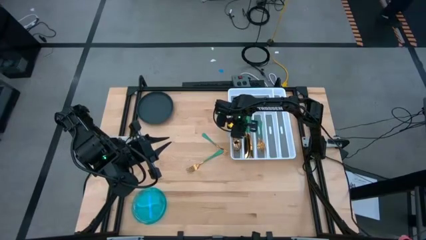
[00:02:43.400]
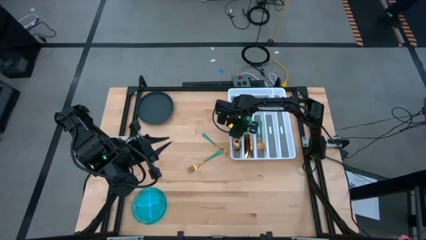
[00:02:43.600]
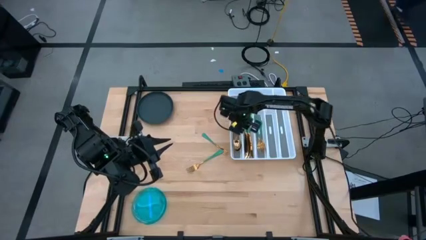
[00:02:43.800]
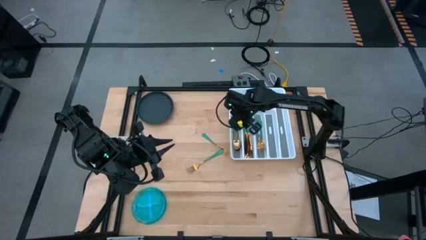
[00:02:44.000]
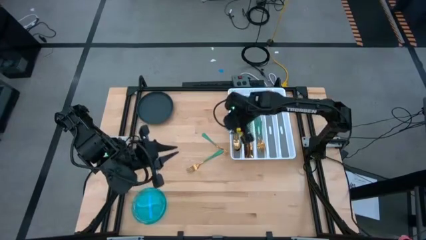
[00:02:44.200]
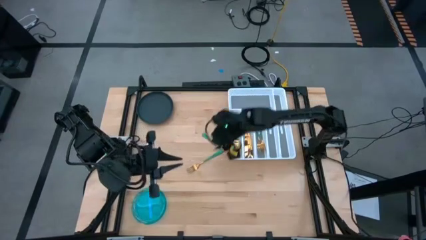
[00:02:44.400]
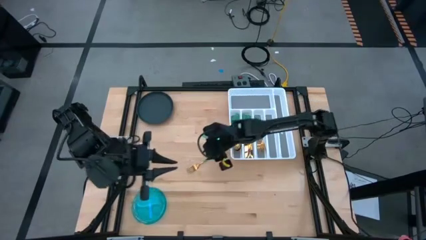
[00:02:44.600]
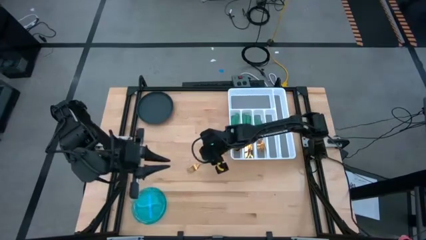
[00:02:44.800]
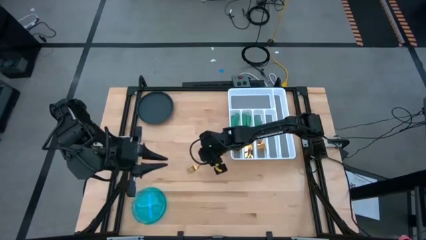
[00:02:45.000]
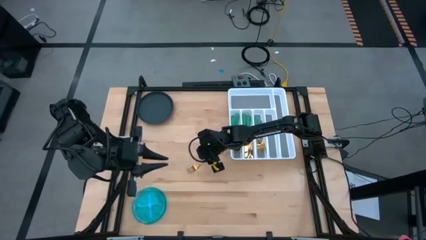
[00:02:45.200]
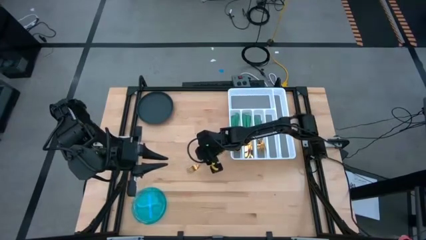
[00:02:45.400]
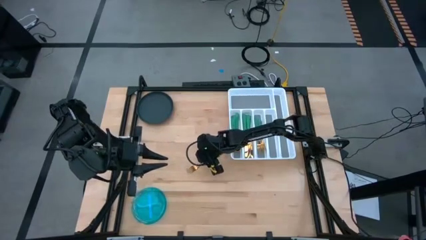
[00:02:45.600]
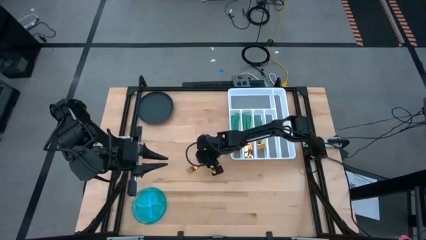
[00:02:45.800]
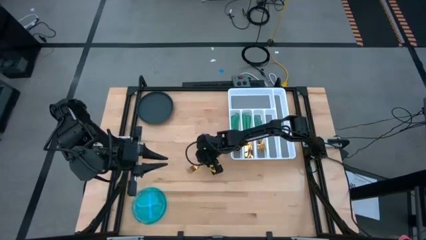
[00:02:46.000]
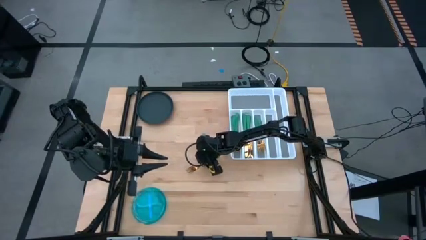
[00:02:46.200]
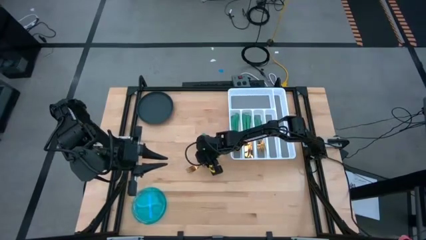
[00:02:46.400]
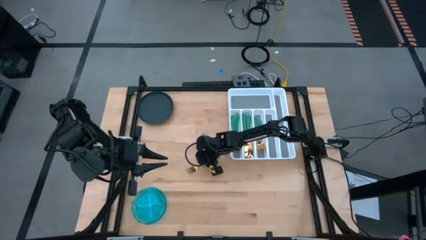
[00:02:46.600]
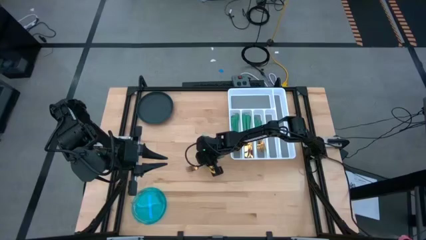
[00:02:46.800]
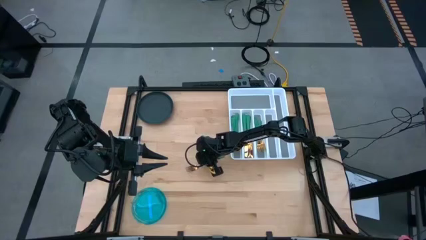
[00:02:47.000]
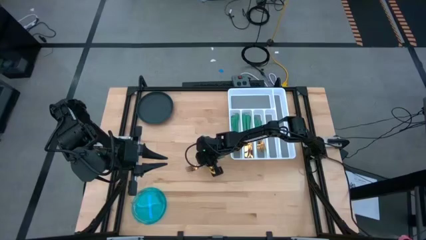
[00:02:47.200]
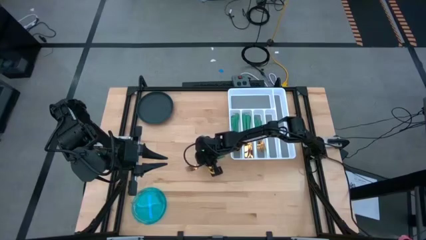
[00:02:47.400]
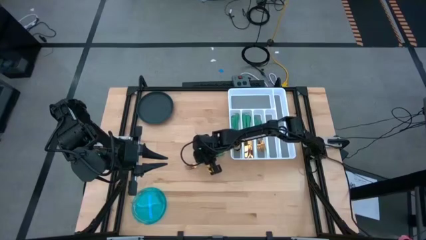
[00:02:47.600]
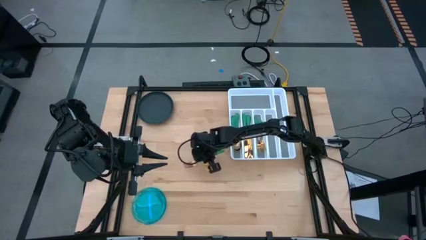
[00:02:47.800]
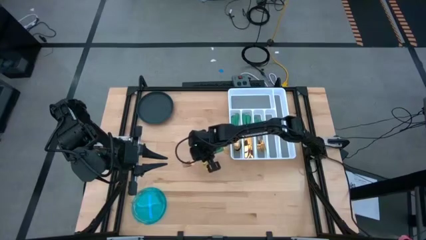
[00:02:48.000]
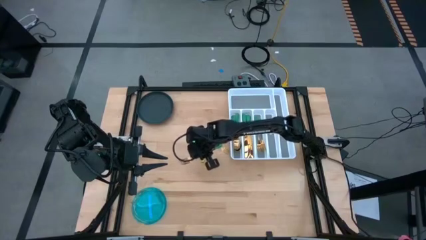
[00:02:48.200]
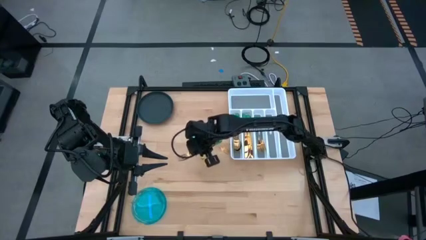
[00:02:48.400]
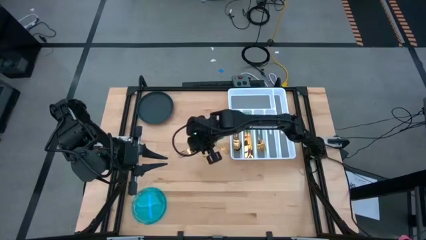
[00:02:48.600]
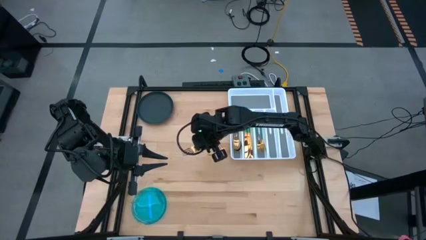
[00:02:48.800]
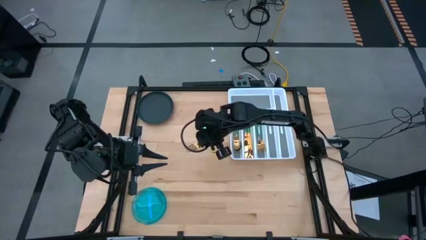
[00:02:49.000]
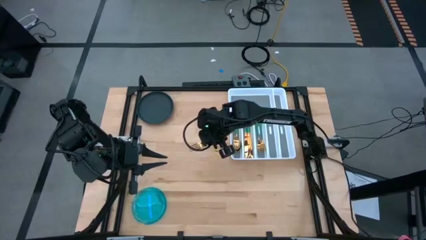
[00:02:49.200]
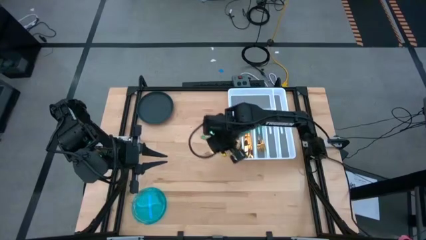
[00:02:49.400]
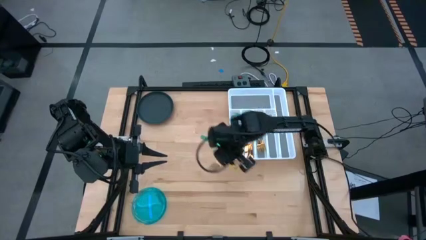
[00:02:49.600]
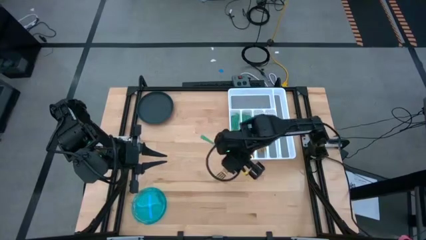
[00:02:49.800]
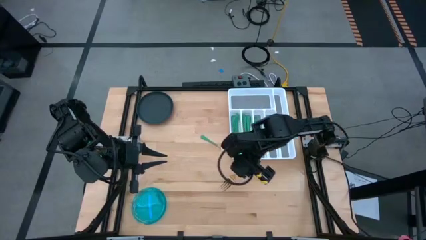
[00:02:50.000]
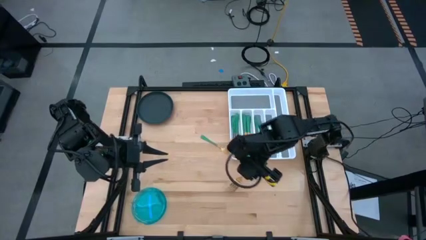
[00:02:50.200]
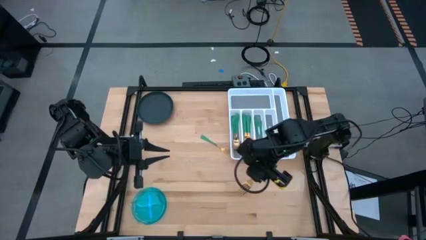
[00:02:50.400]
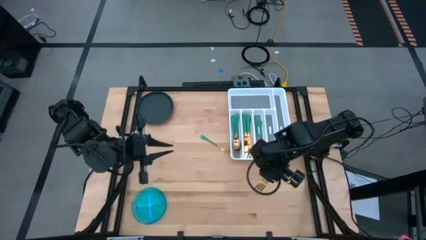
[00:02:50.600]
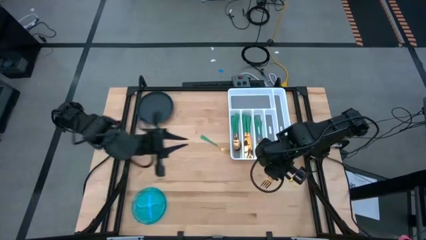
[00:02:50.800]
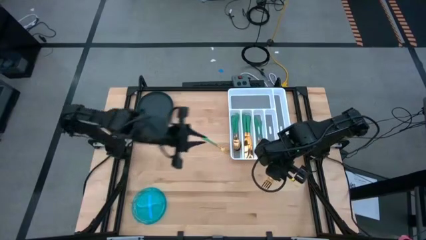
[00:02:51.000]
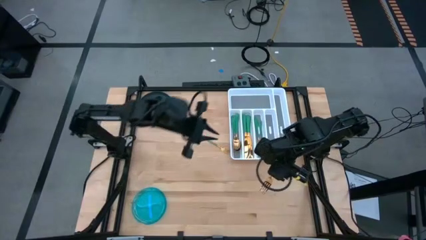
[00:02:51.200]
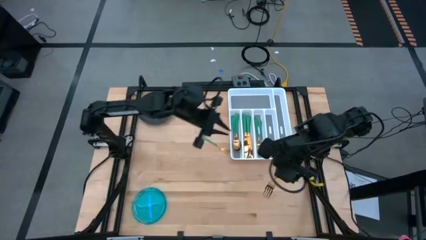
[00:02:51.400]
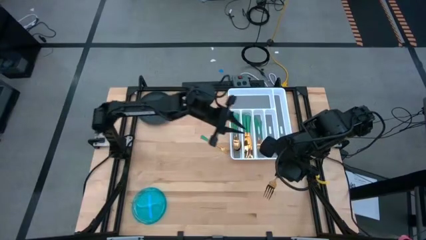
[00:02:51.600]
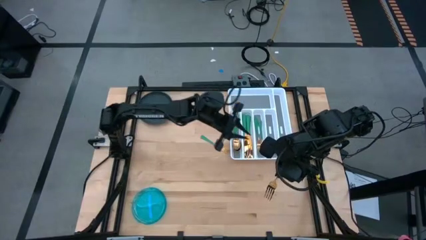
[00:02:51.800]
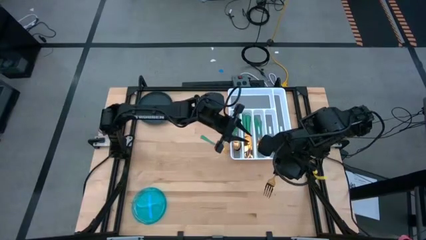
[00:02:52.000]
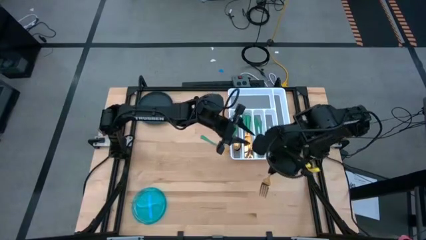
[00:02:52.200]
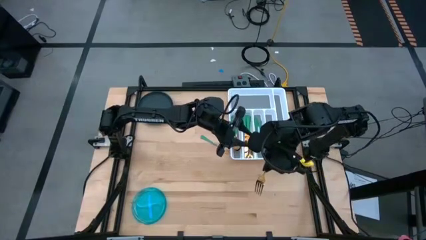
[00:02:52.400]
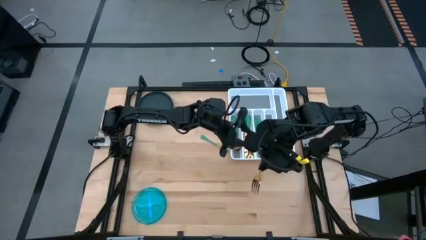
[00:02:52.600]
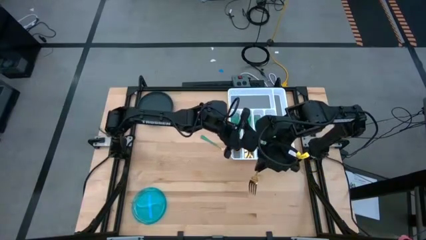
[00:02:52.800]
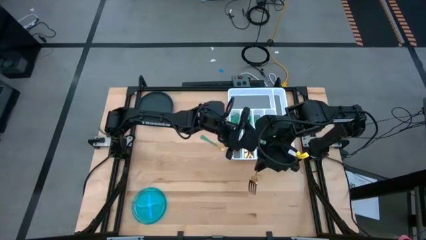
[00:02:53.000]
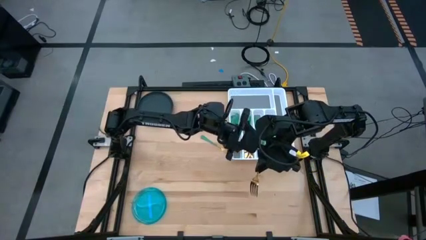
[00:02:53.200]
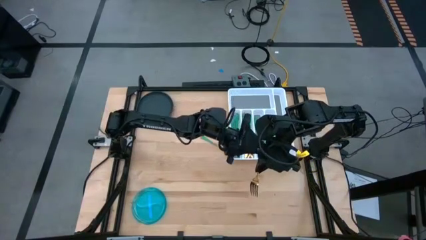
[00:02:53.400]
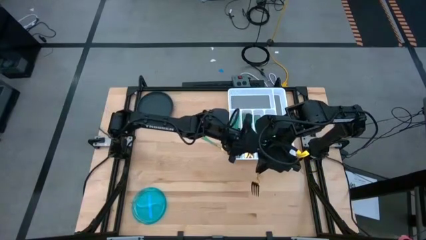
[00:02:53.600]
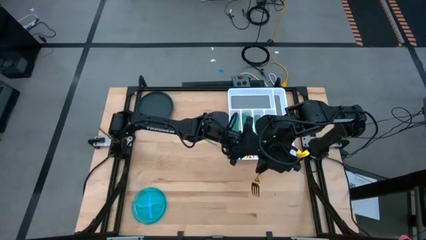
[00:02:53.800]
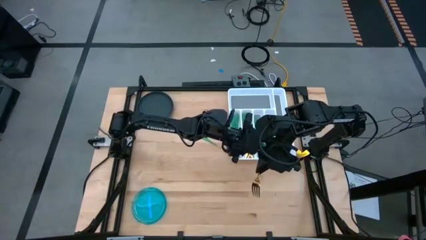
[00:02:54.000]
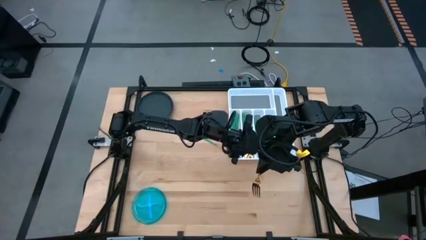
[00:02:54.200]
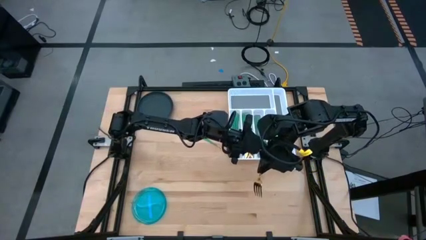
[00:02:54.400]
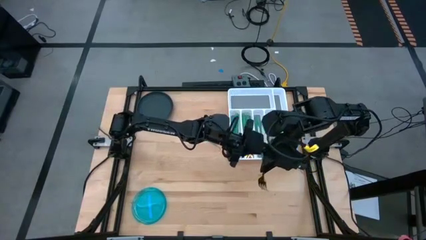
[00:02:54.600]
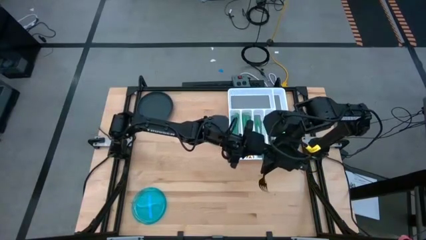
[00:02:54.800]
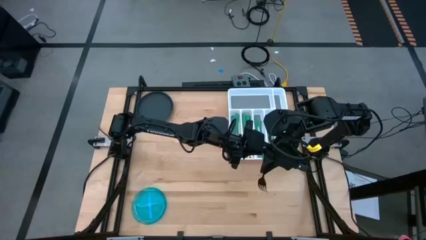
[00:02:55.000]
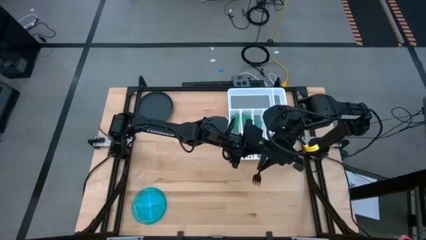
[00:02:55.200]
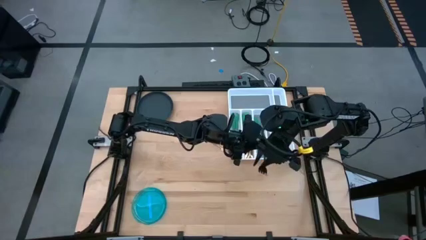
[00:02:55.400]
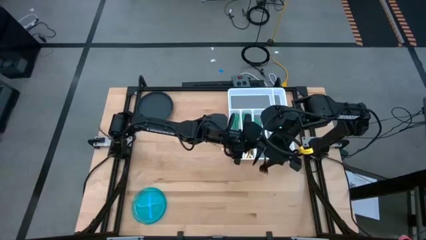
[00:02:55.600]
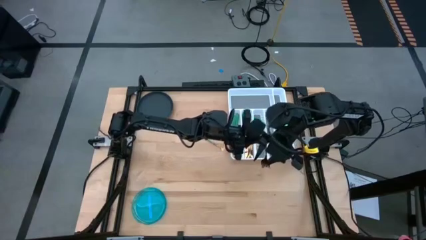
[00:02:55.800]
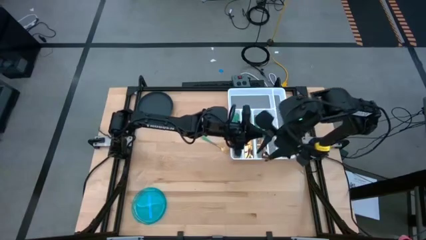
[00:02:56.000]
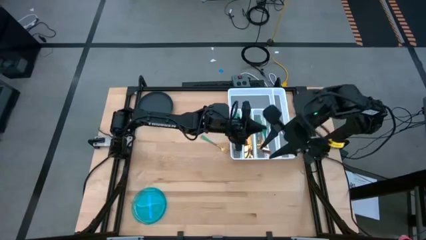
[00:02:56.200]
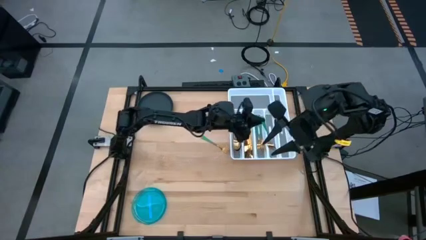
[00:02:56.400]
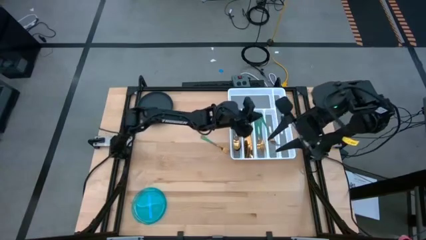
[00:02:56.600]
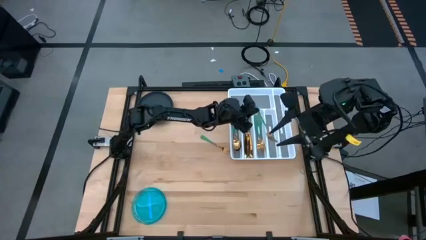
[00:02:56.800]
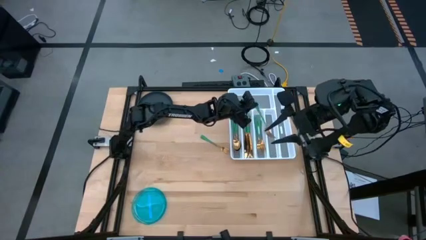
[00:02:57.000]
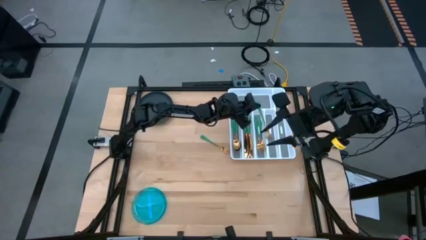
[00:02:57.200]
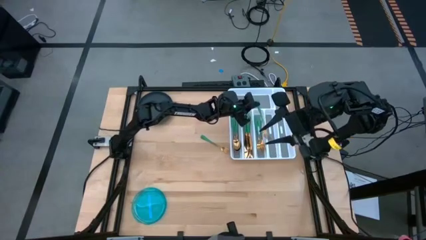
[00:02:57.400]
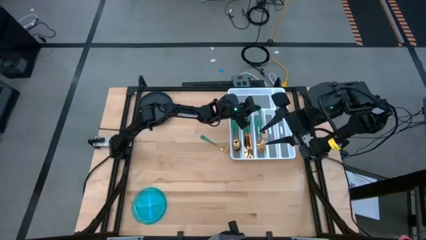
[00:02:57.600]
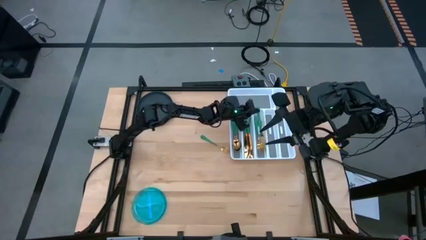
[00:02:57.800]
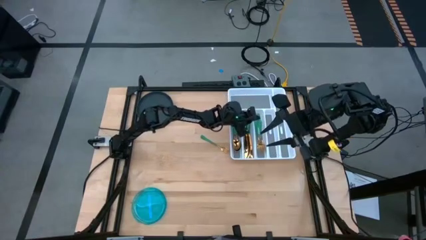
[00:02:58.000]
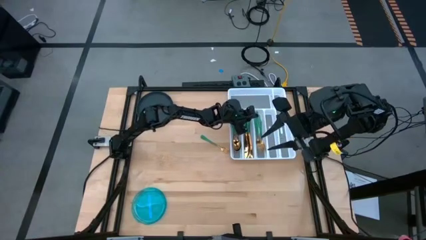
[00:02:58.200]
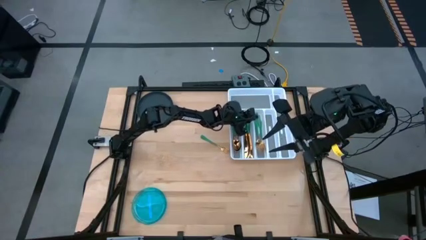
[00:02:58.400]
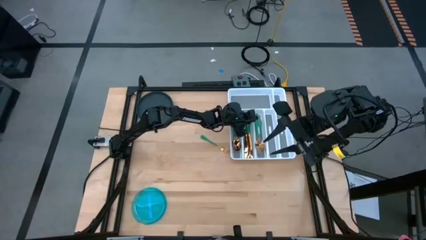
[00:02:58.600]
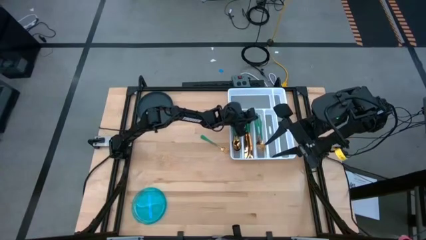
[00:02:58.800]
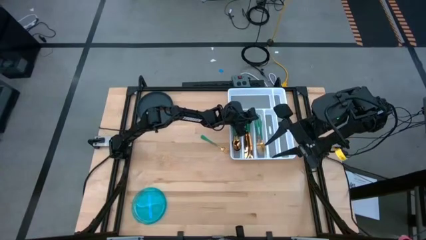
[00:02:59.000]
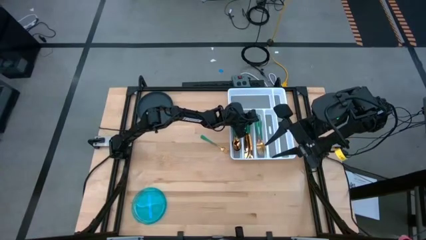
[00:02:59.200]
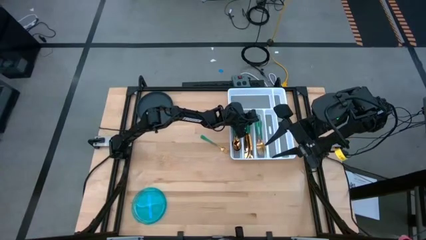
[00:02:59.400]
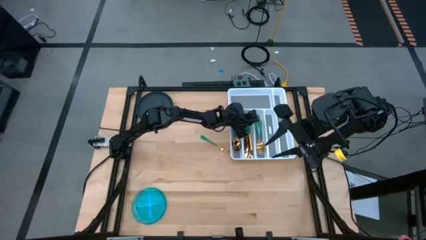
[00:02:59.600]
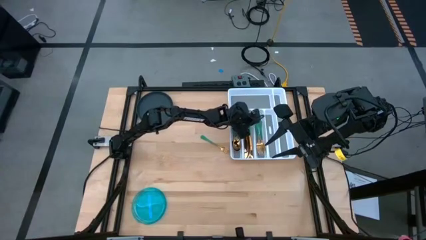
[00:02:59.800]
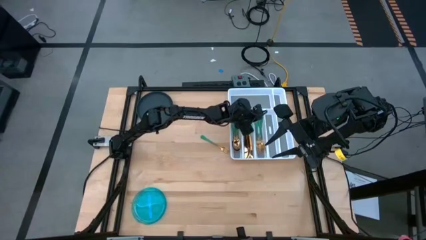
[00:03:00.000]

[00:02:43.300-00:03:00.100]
Task: Sort silverware
Put the bottom green fork into the middle right slot of the white silverware tray
